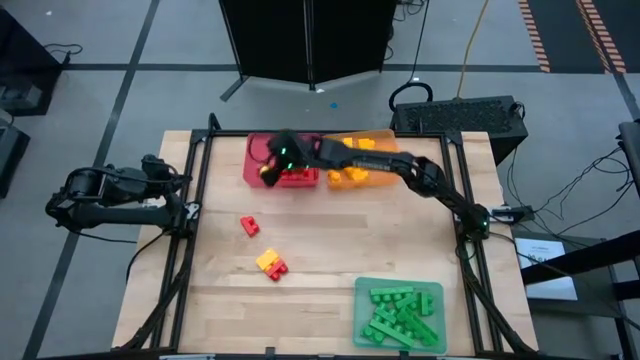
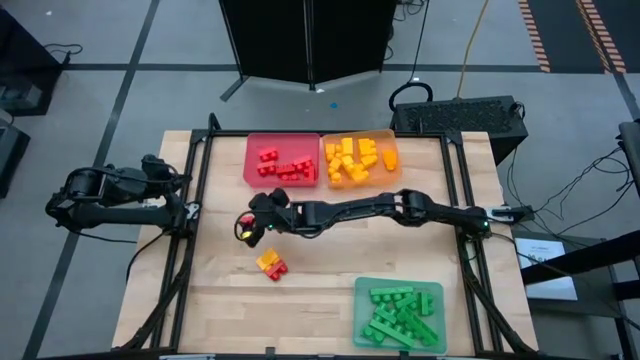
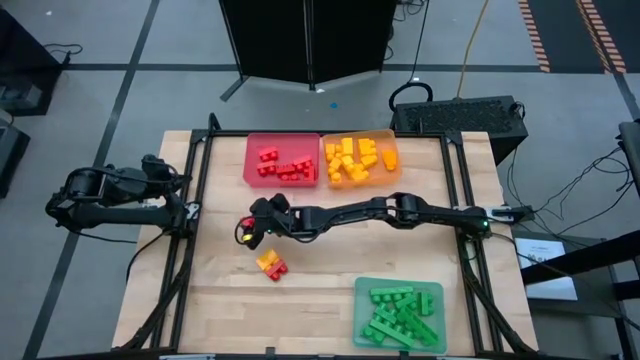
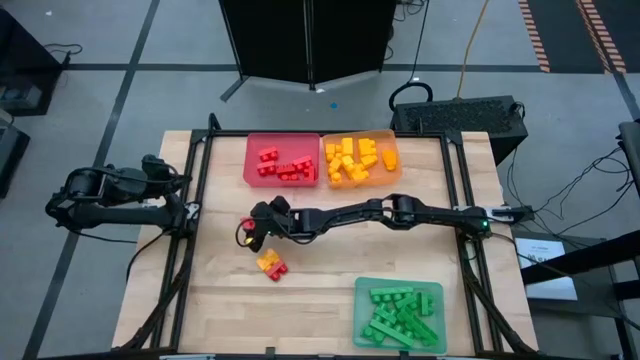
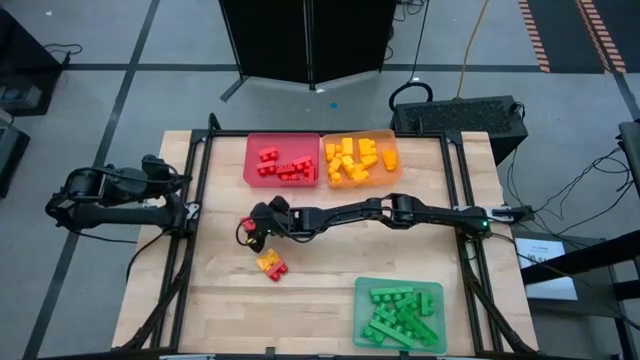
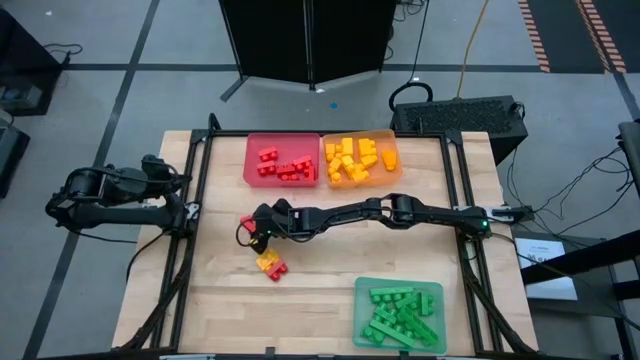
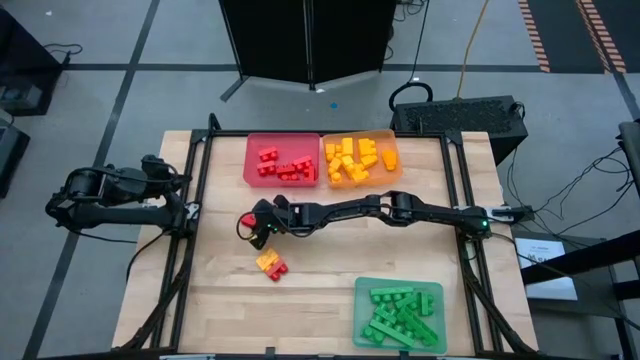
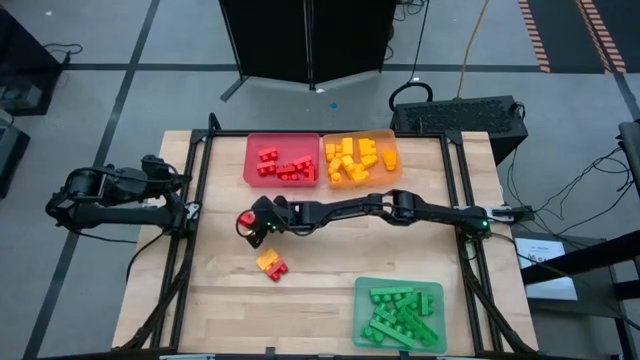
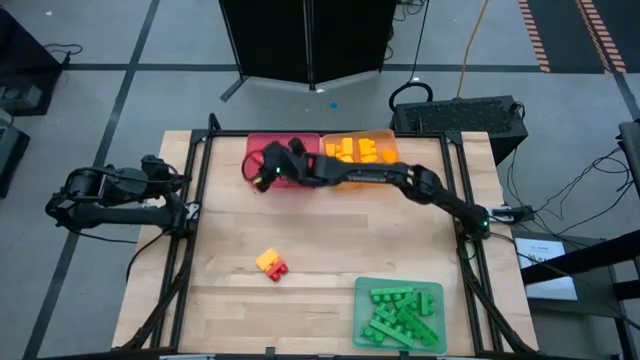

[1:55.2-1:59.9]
Task: Sort blocks
Put the red game piece into the red bin

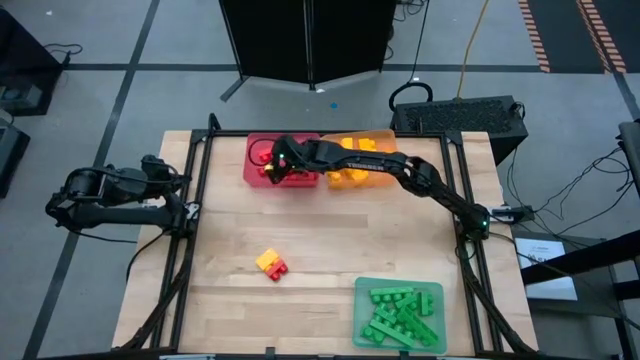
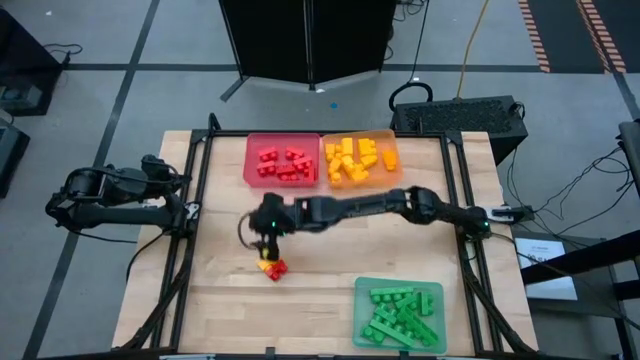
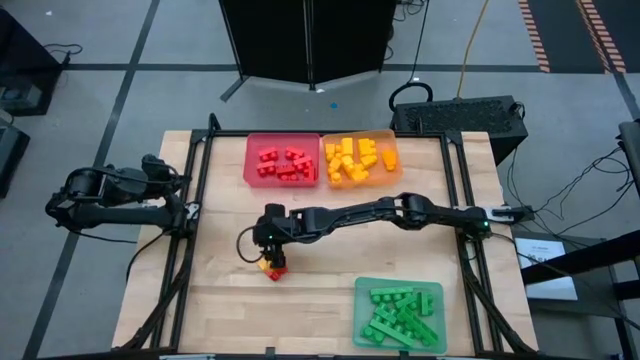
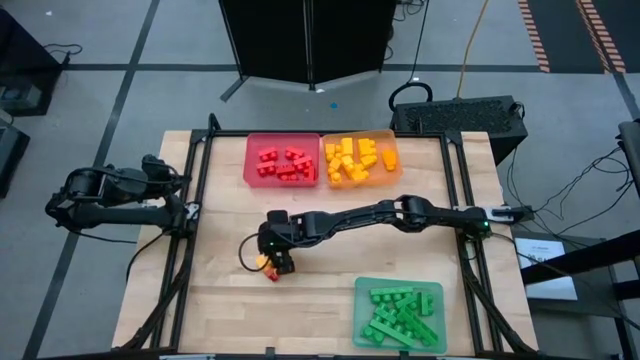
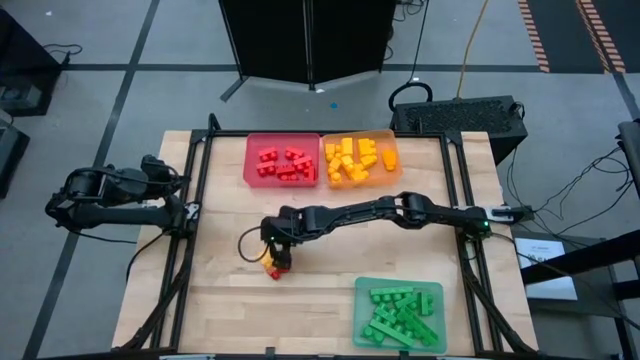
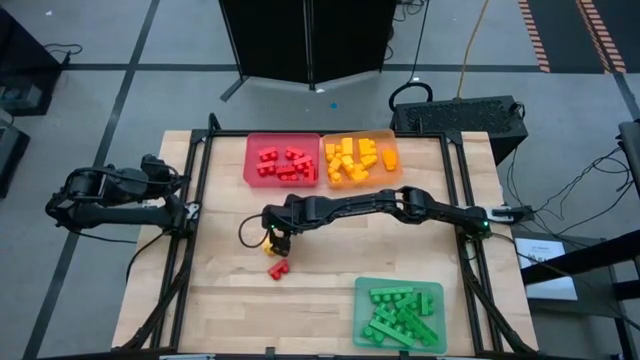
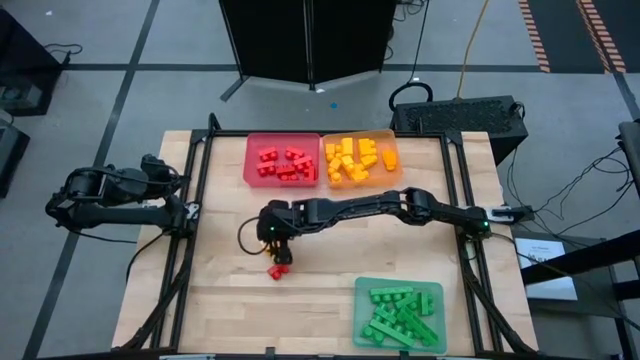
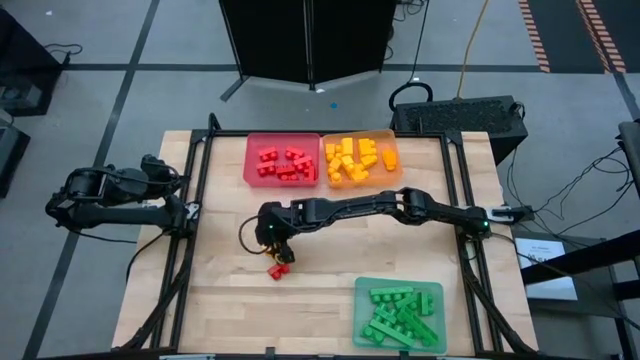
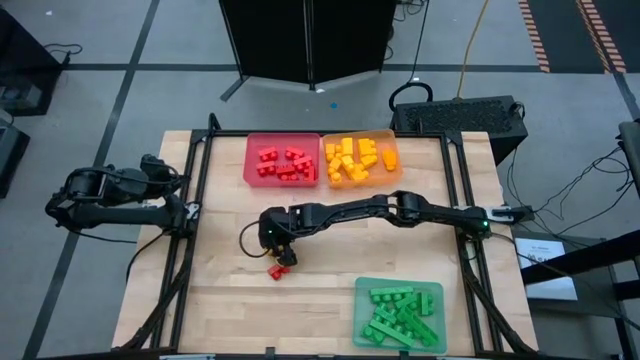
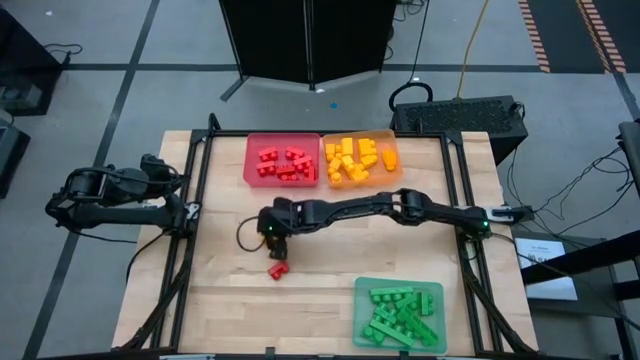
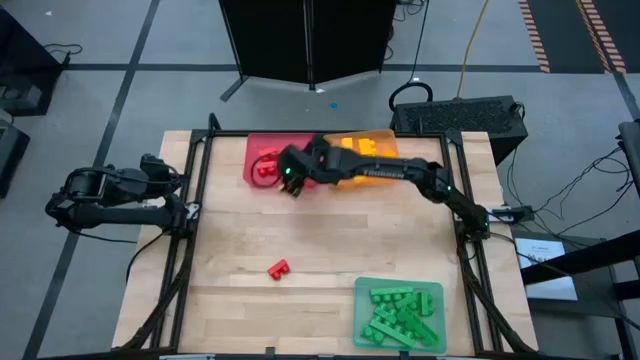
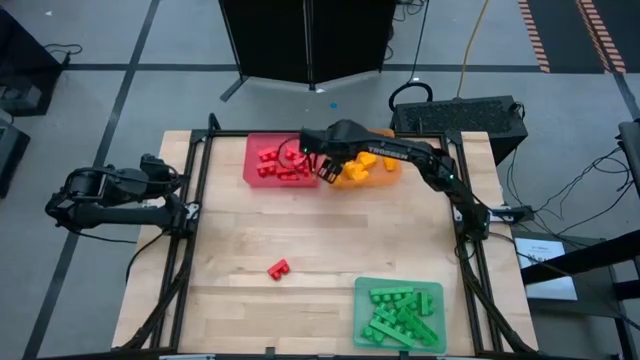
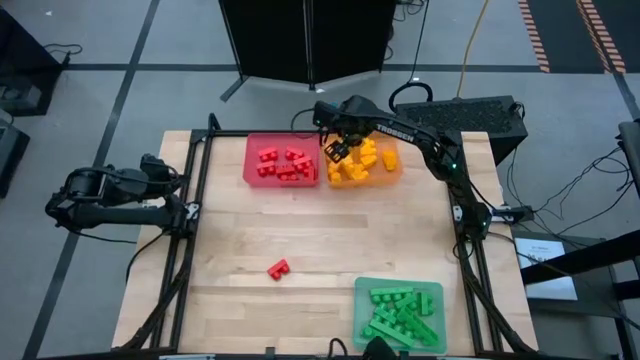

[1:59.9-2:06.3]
Put the yellow game piece into the orange bin

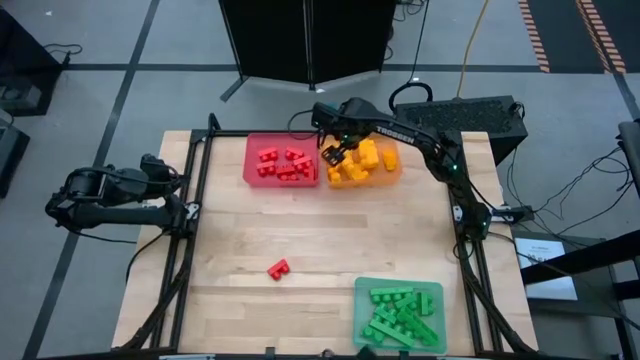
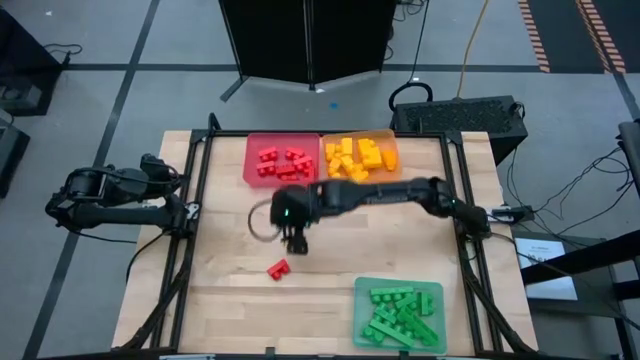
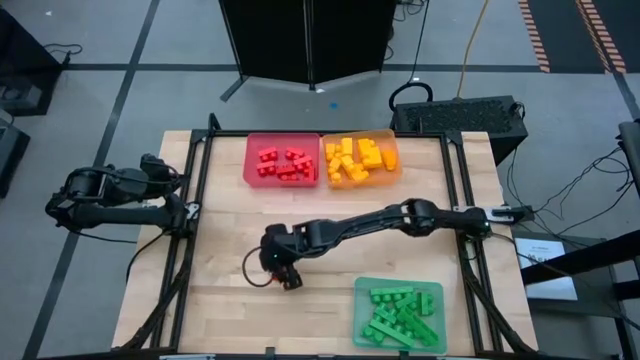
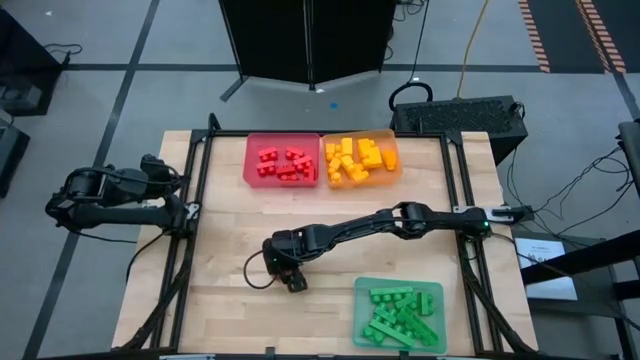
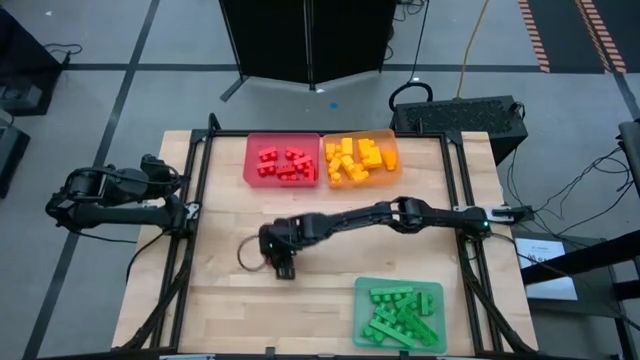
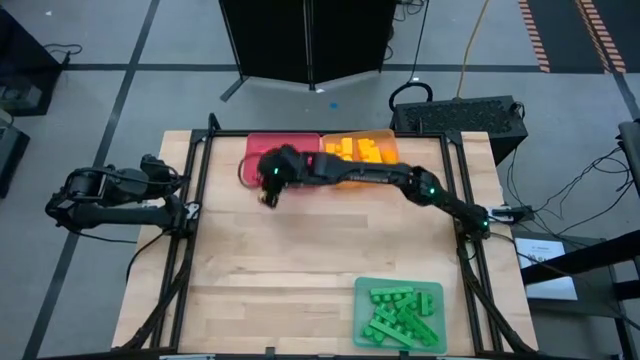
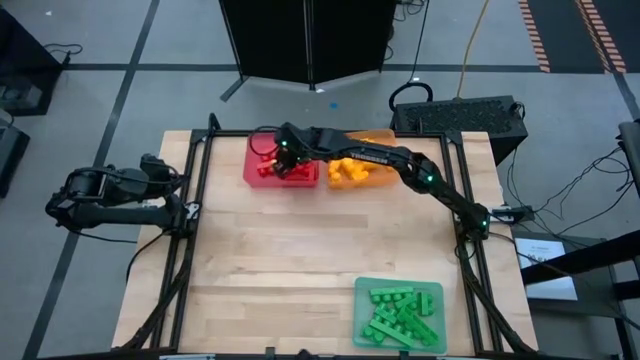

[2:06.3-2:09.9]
Put the red game piece into the red bin

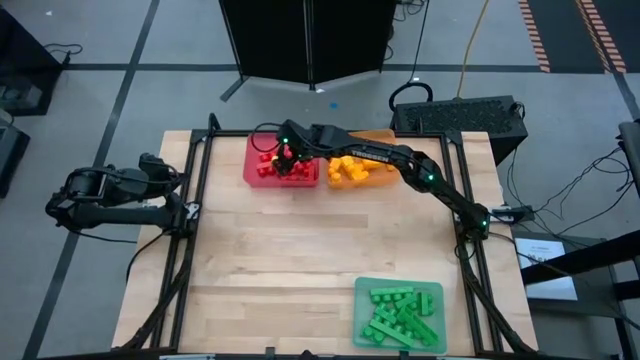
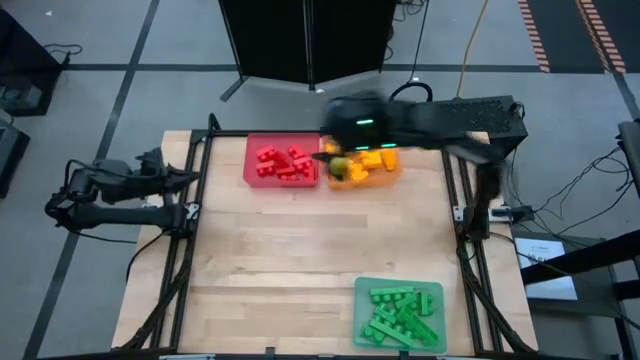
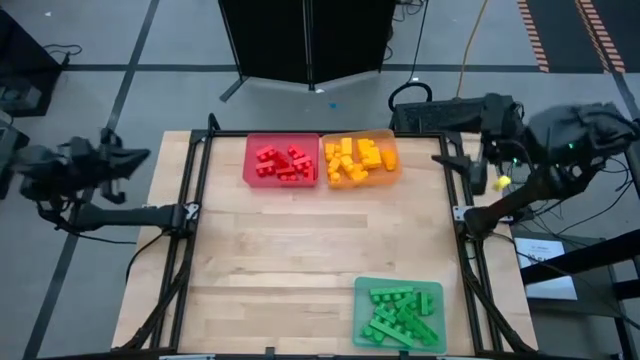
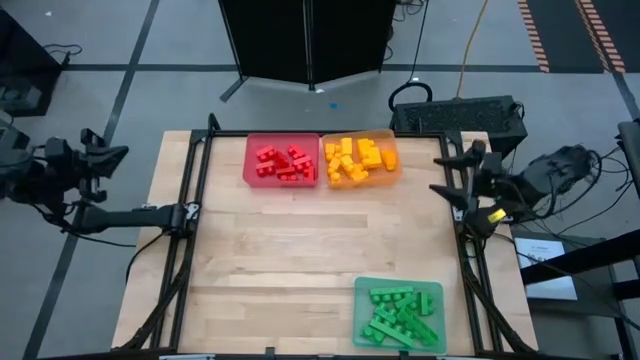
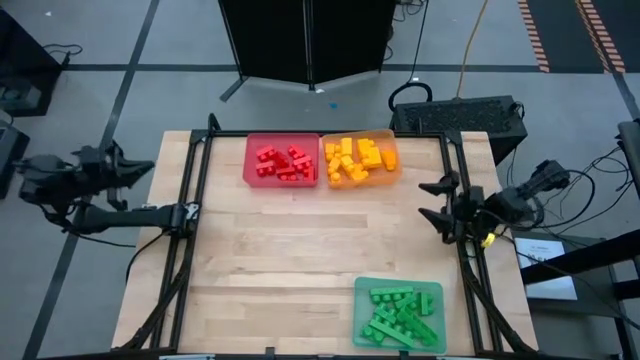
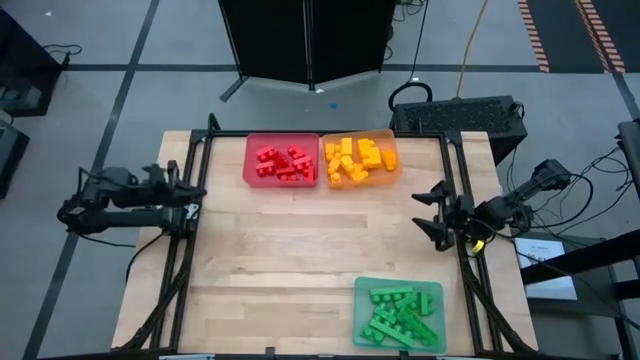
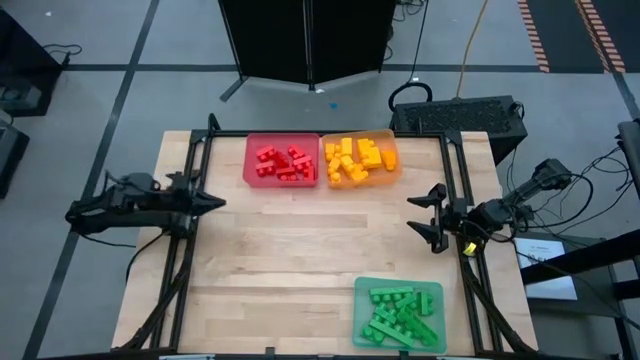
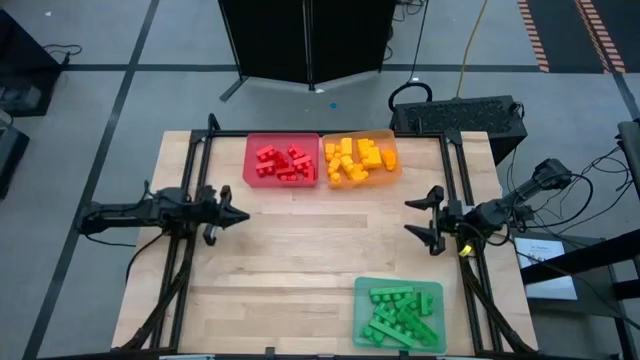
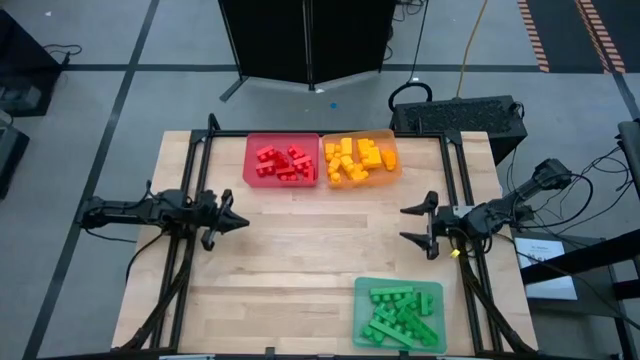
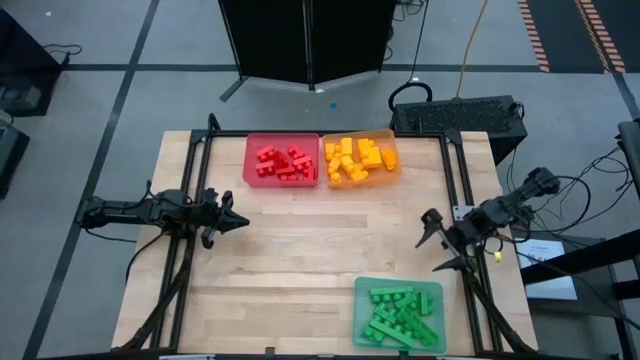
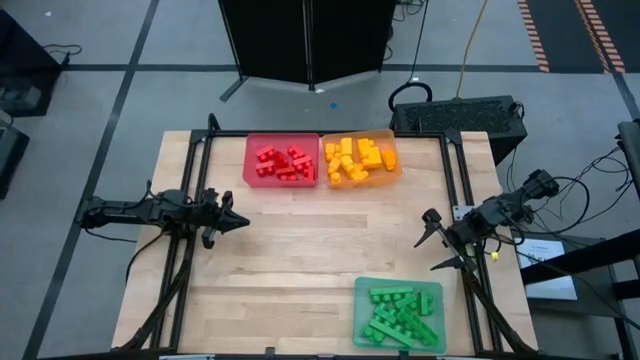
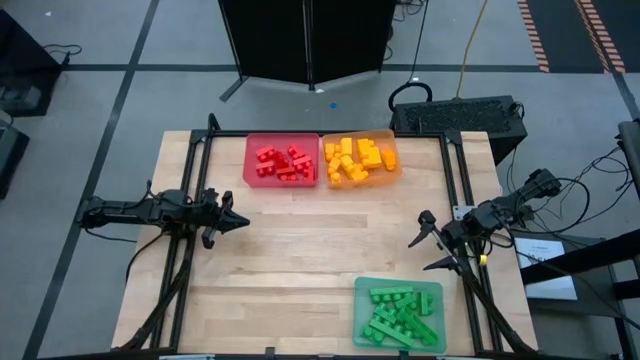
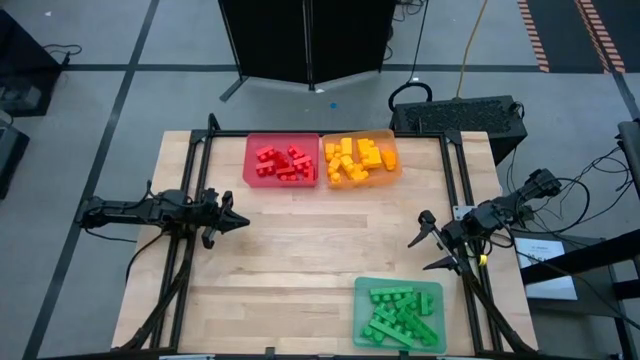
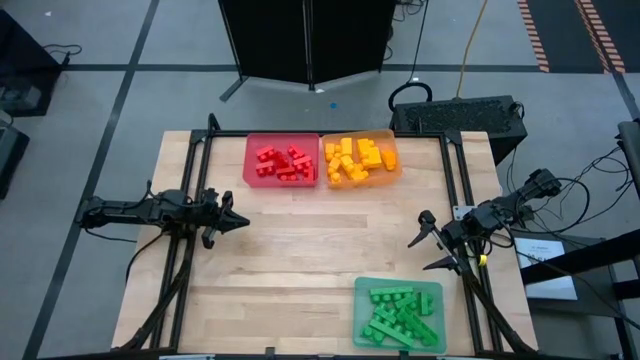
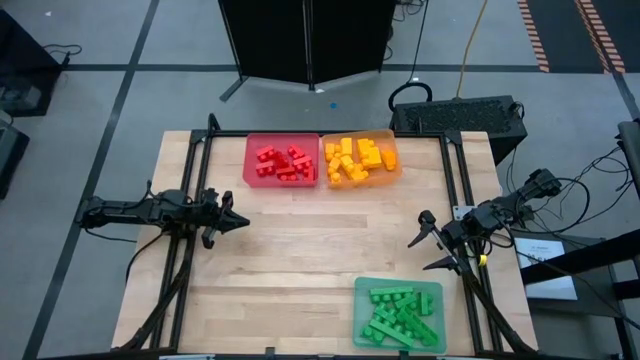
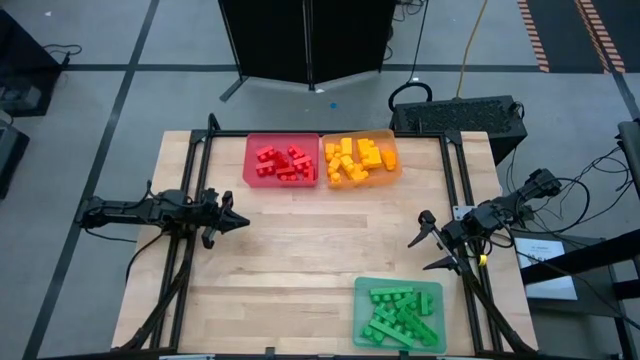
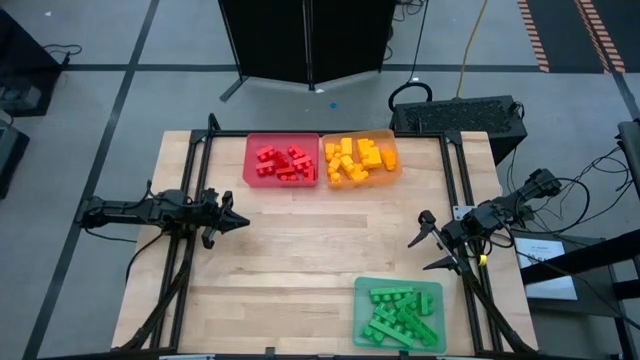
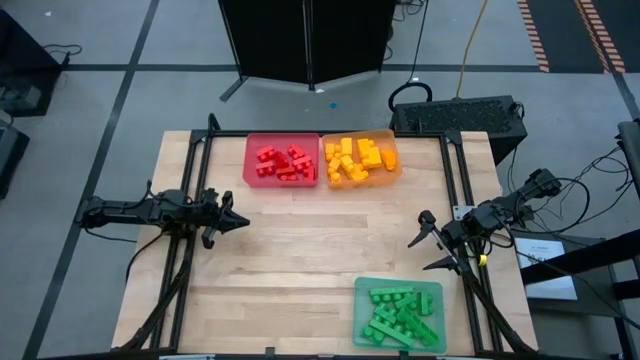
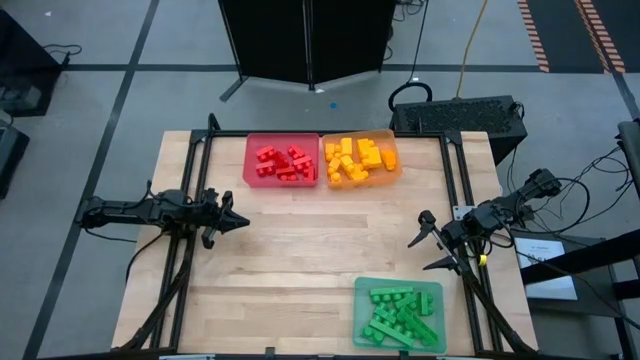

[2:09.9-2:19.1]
Return to Home Position
